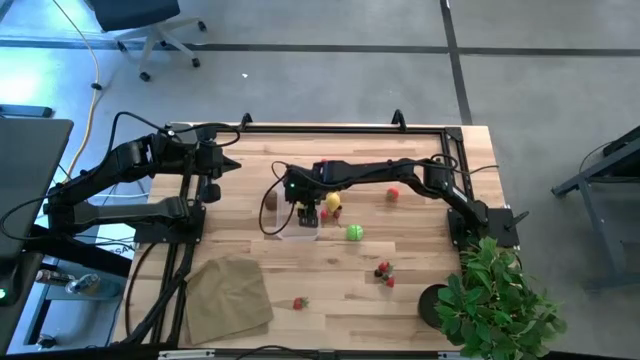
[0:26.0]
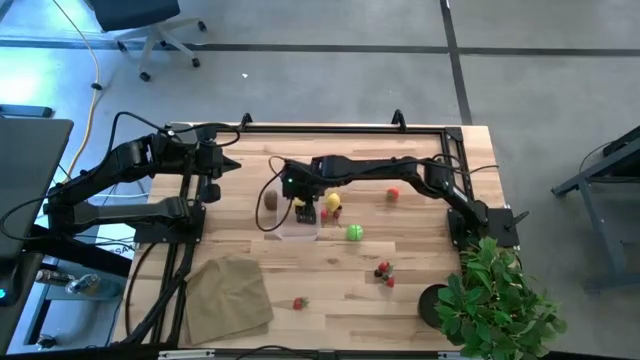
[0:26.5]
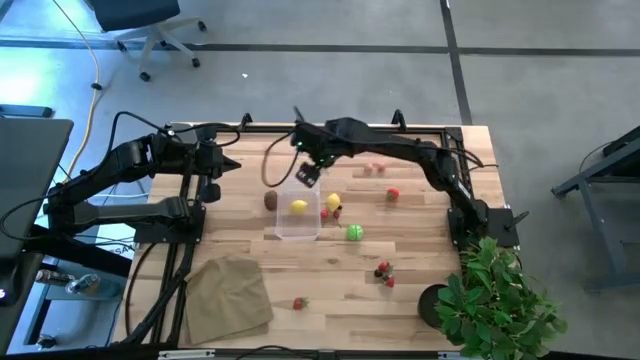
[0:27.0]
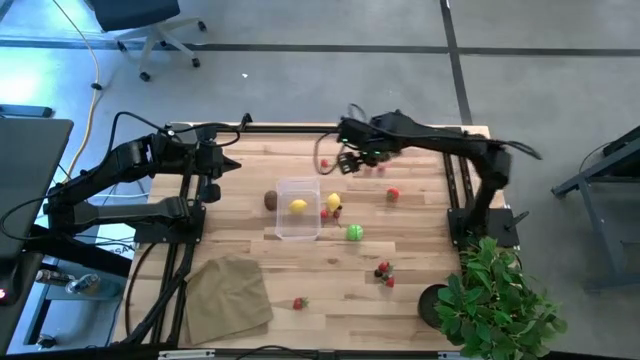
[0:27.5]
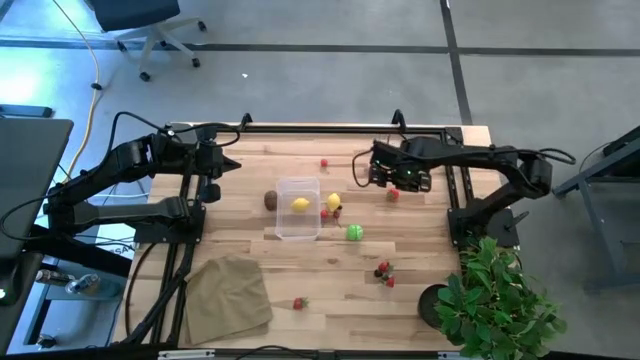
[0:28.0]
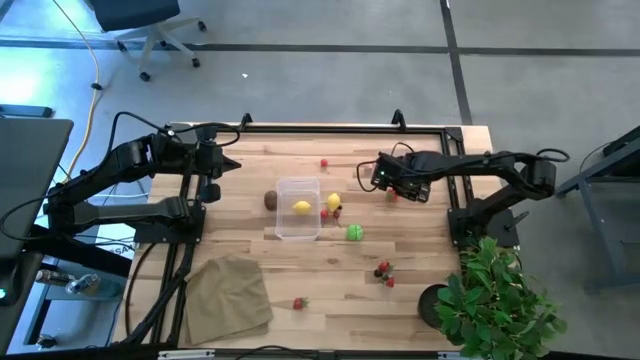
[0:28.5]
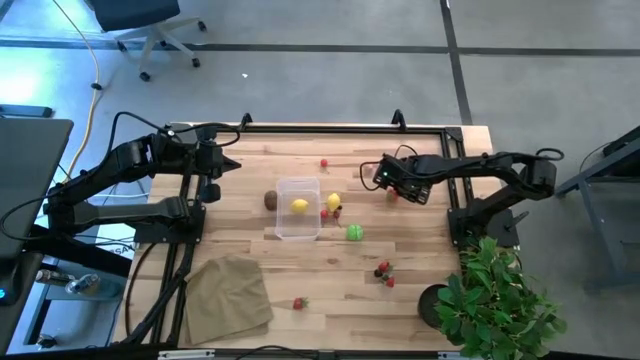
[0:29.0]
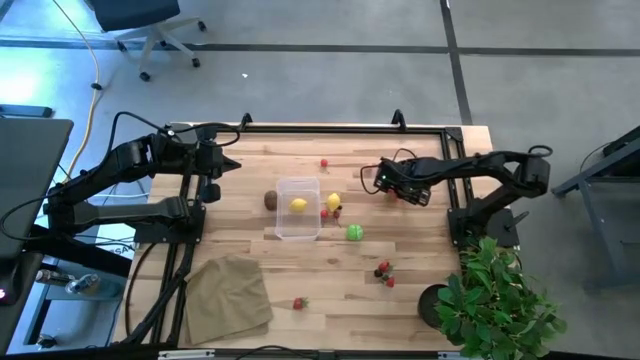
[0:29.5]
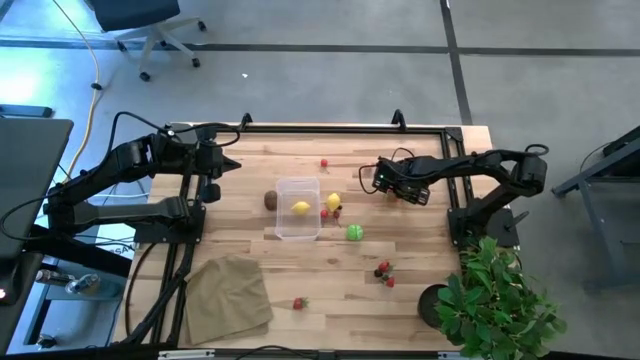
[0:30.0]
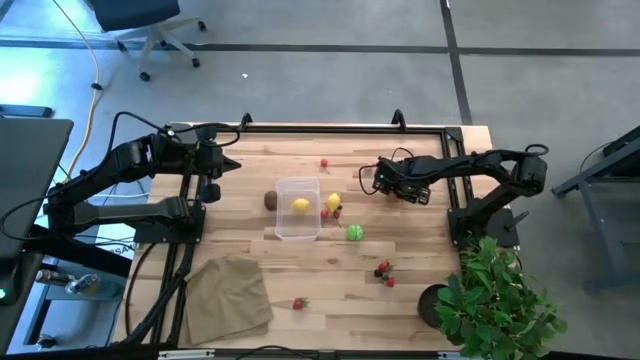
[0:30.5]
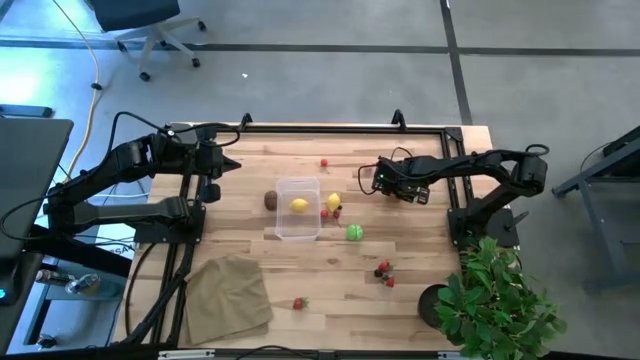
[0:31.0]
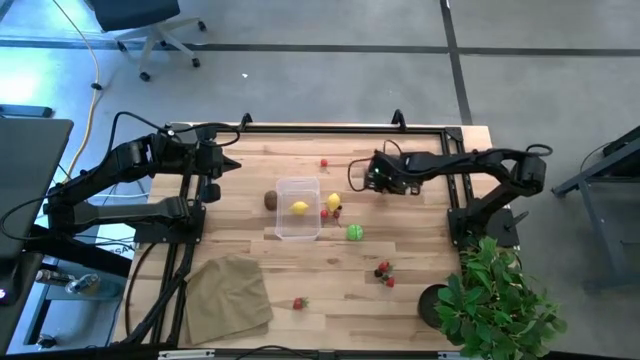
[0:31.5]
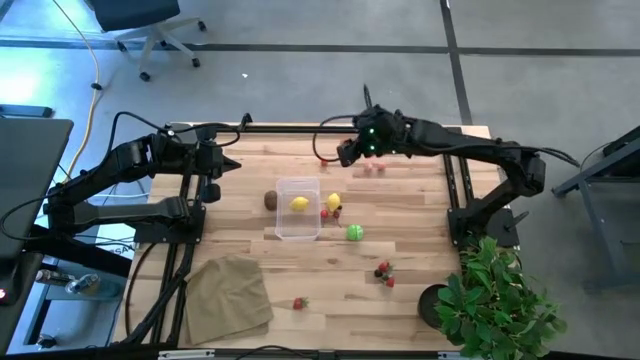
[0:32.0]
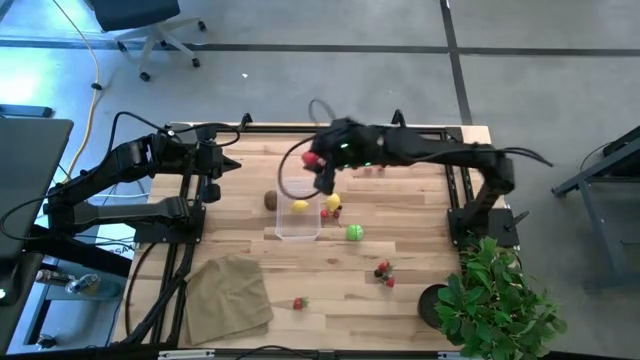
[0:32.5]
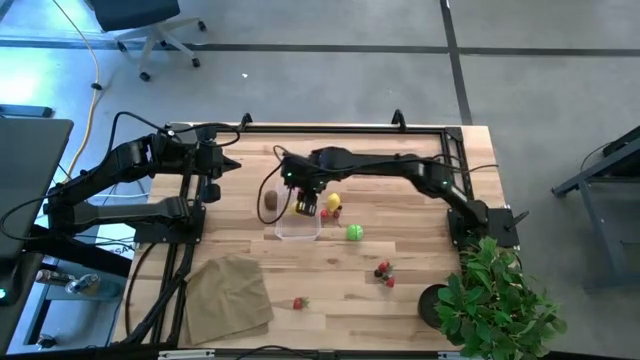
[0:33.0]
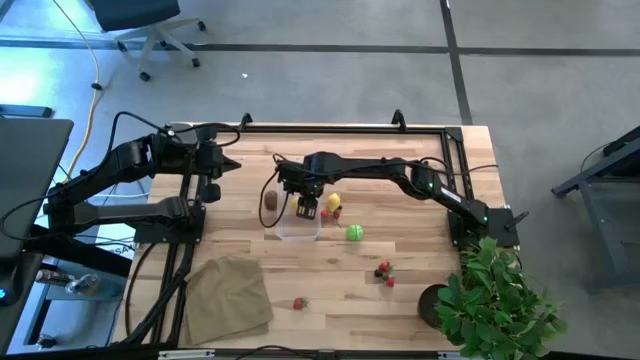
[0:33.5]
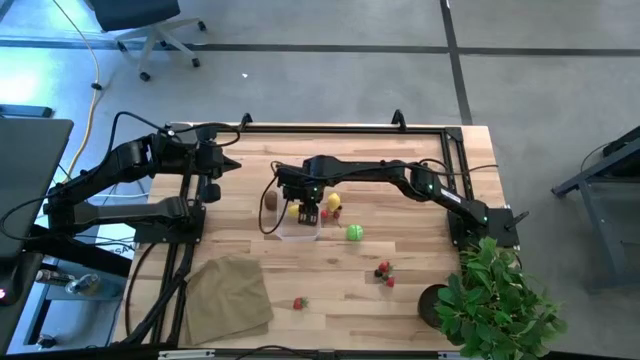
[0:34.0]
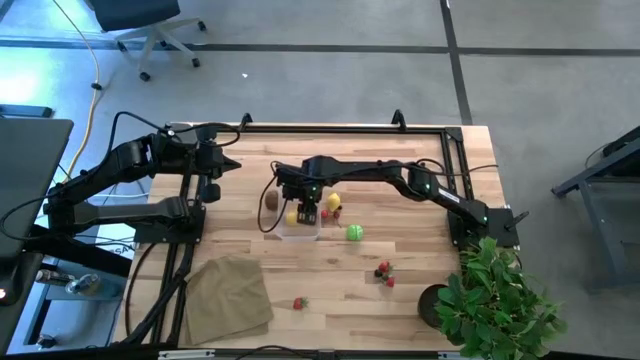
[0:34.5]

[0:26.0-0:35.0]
Task: Pick and placing Produce into tupperware
Put the strawberry into the transparent bin

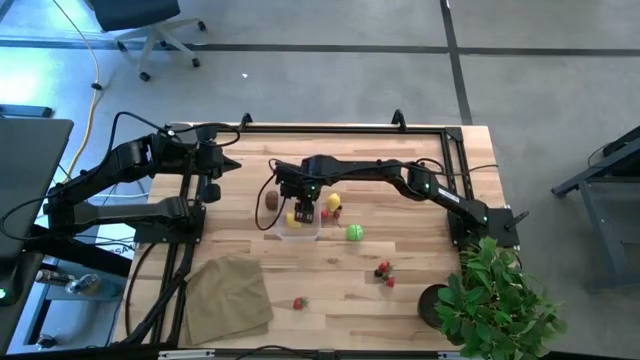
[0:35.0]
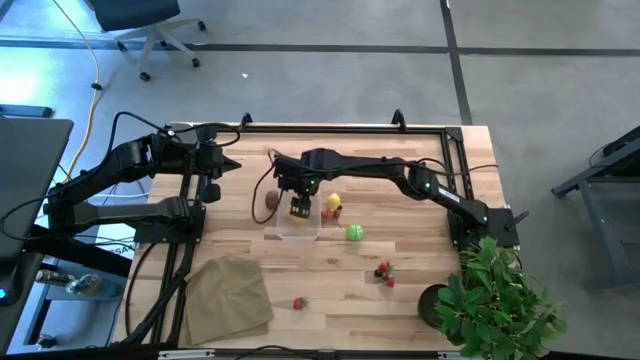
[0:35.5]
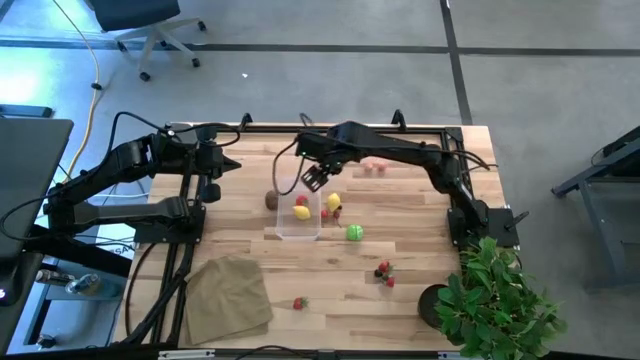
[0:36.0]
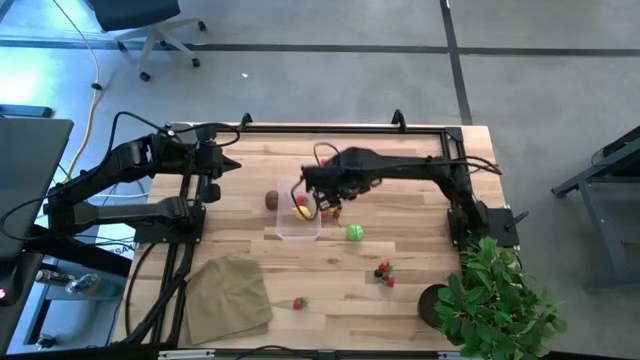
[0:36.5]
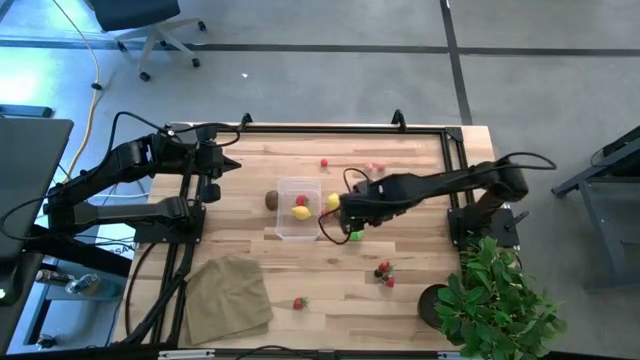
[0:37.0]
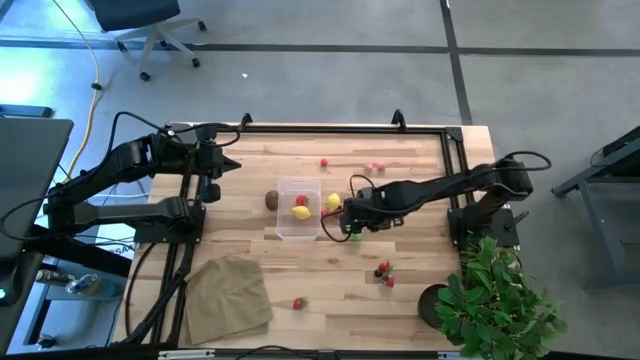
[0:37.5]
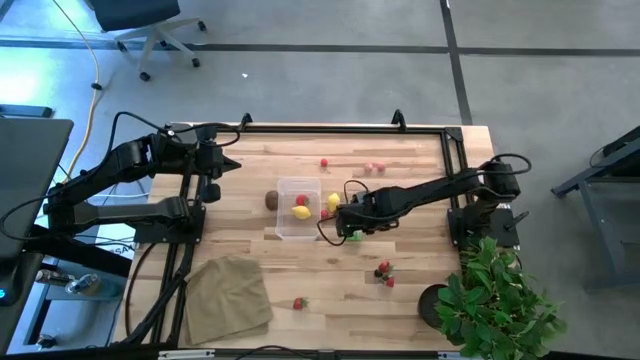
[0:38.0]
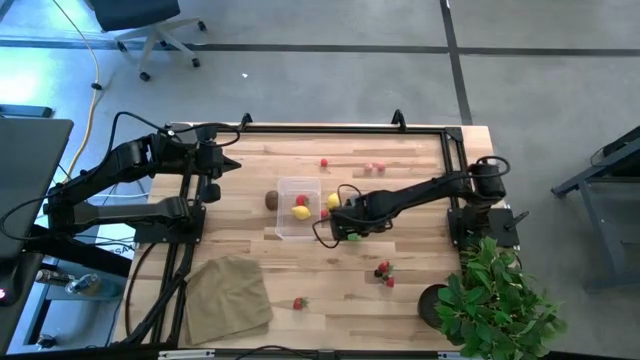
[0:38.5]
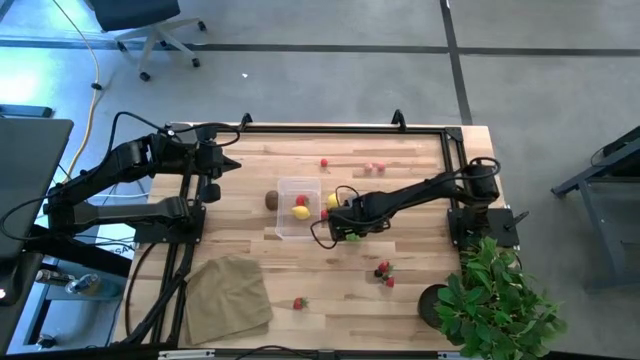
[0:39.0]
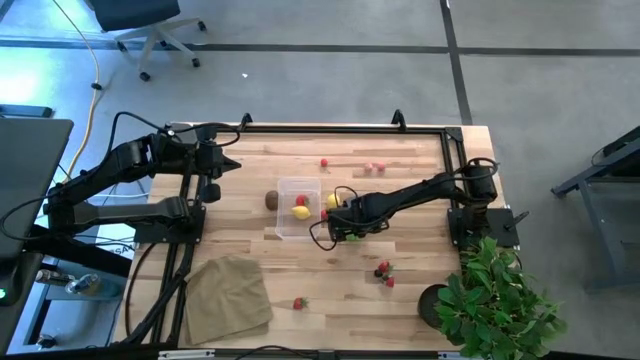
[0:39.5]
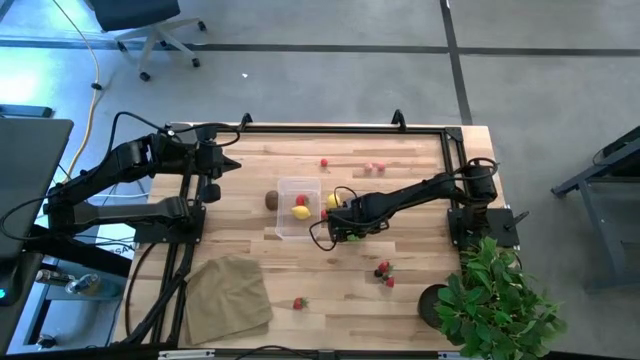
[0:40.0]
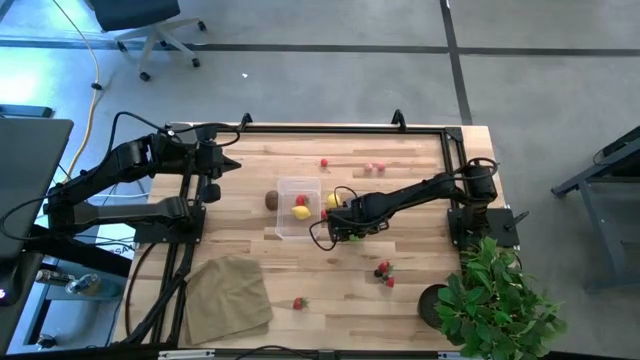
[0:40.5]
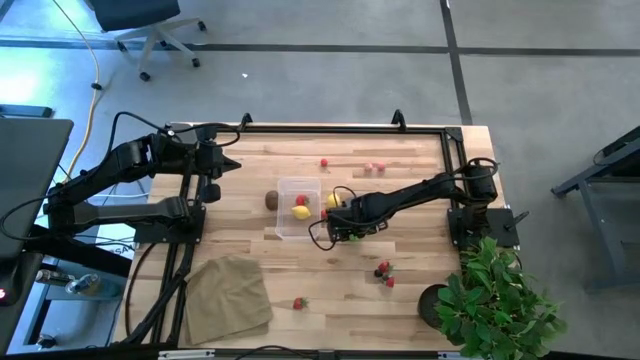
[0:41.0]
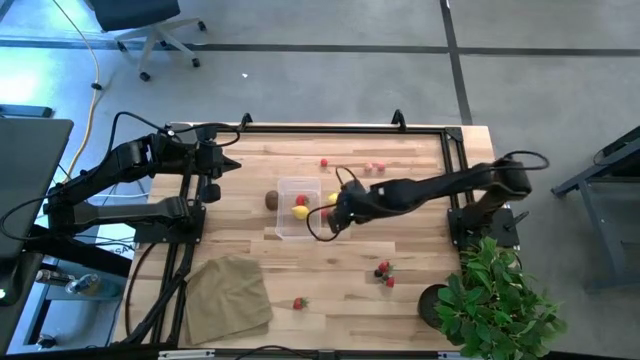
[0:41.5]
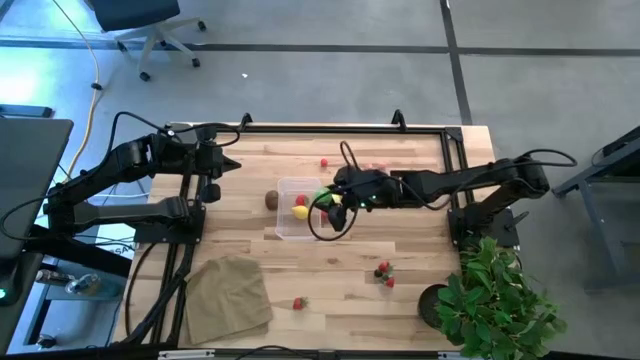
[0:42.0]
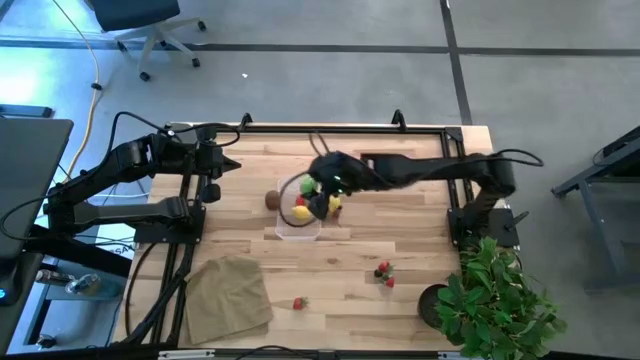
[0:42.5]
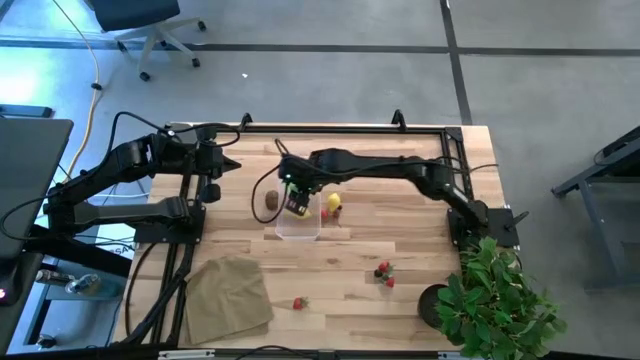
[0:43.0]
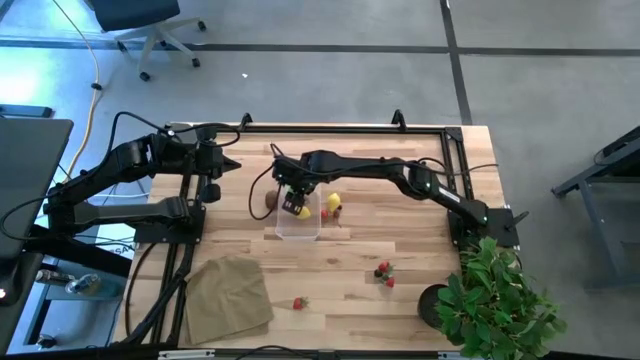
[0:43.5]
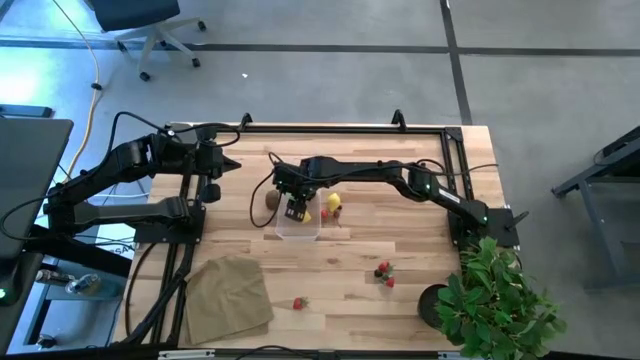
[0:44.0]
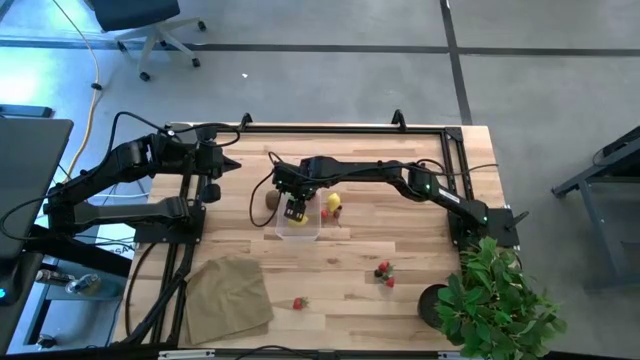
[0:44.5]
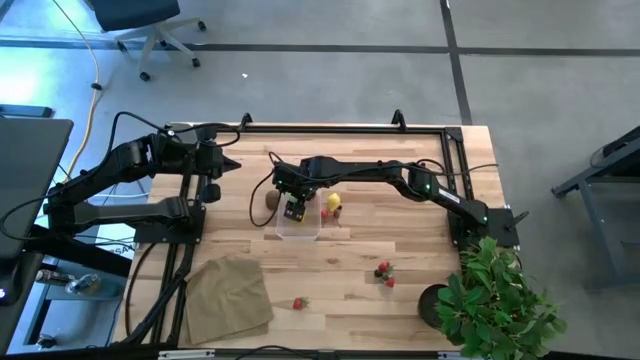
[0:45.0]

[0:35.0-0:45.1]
Put the cabbage into the transparent bin

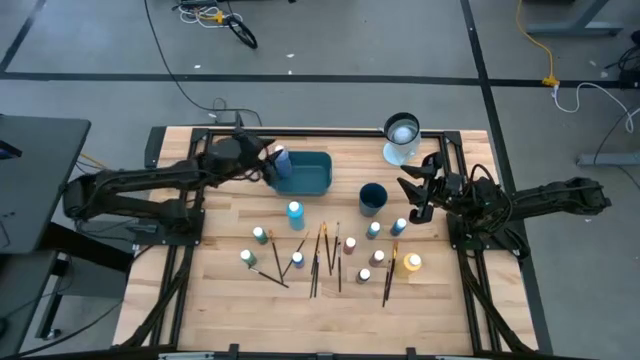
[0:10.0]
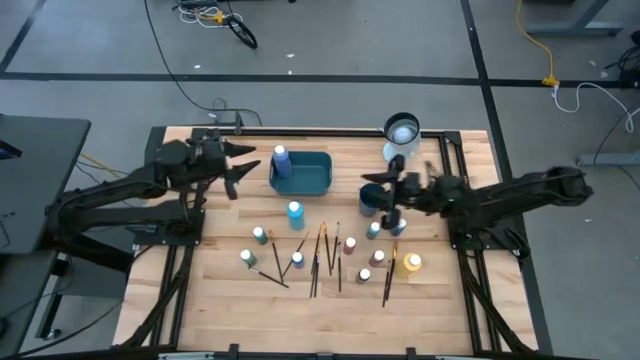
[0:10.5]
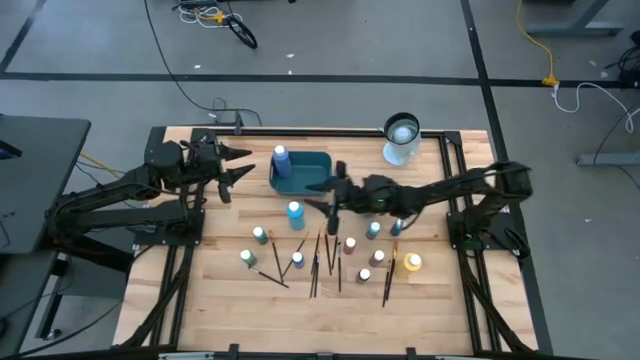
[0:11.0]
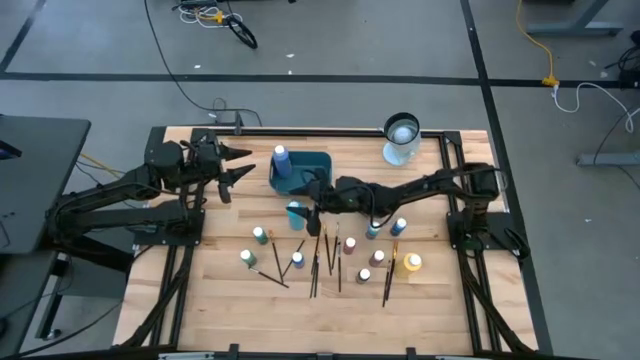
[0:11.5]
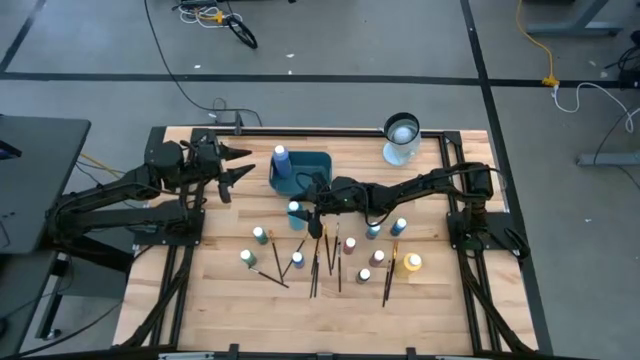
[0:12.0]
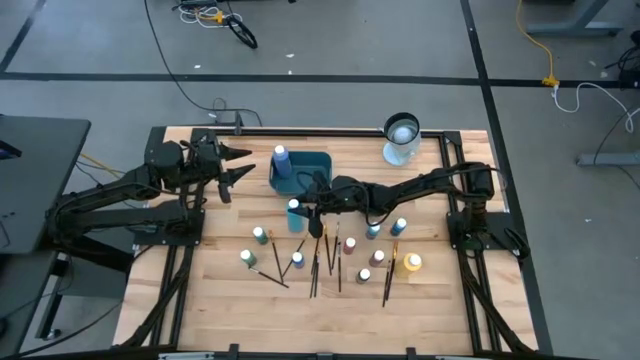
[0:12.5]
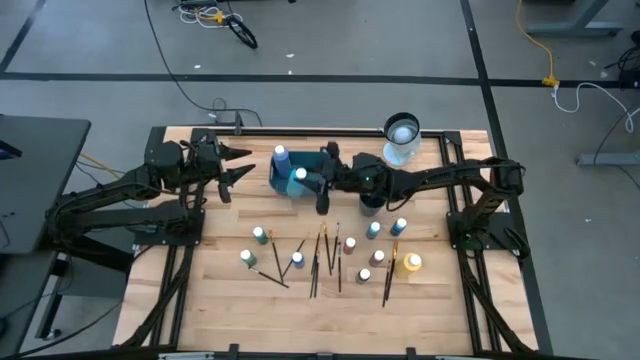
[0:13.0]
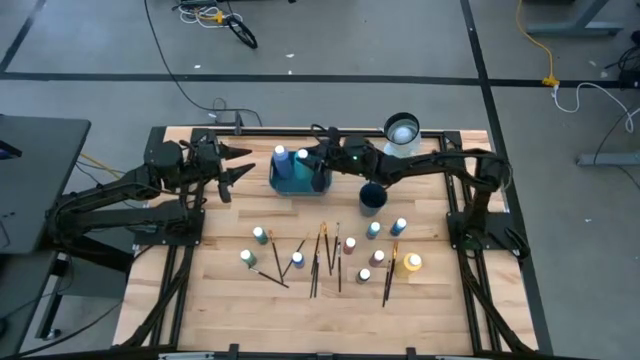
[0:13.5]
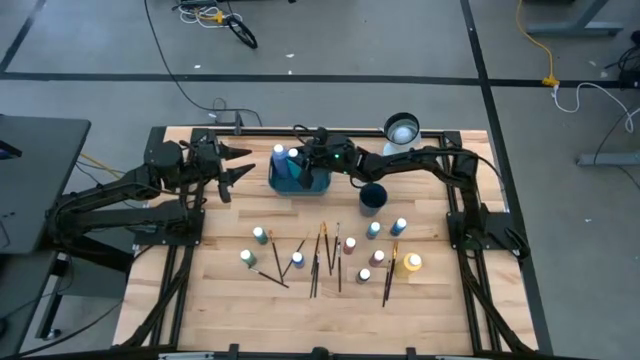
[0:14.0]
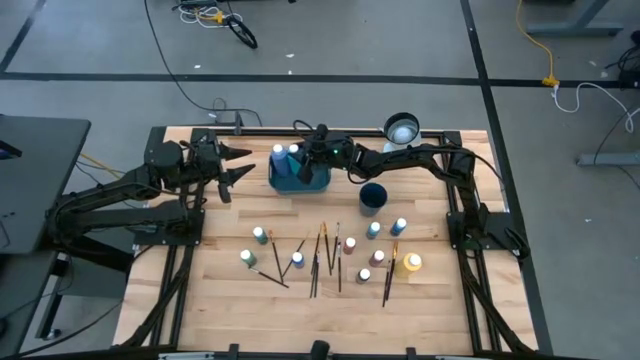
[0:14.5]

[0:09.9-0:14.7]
Task: Pick & Place Paint Supplies
Put the blue paint bottle into the blue bin
